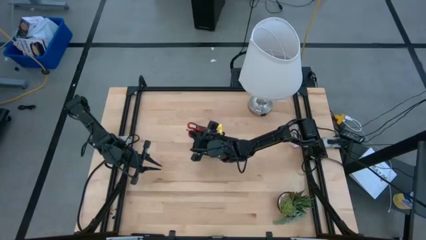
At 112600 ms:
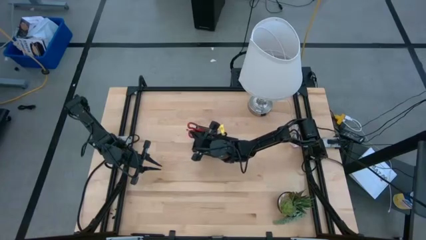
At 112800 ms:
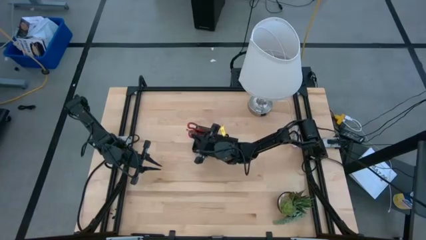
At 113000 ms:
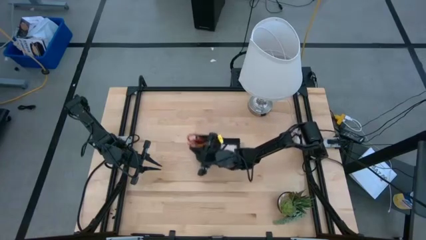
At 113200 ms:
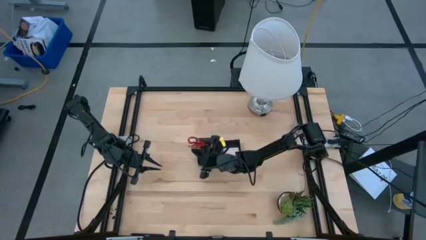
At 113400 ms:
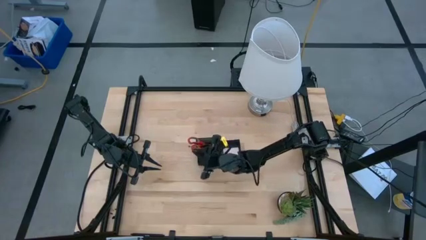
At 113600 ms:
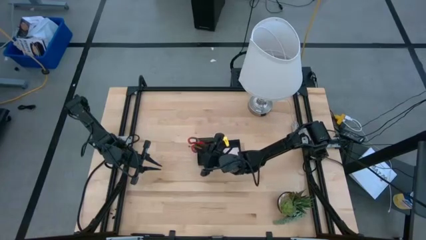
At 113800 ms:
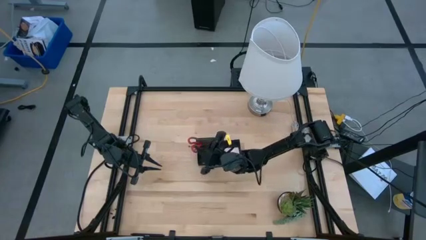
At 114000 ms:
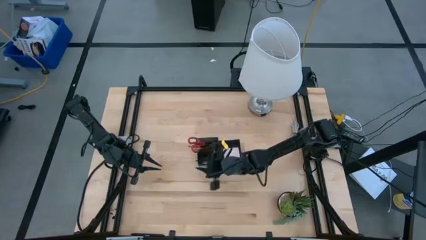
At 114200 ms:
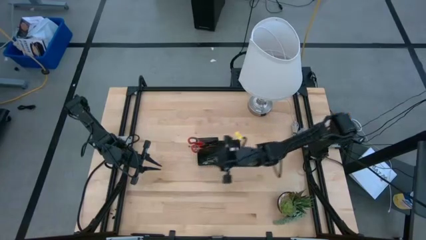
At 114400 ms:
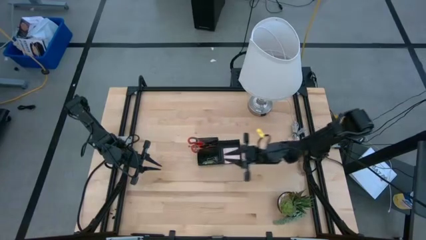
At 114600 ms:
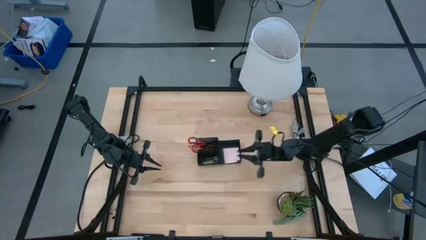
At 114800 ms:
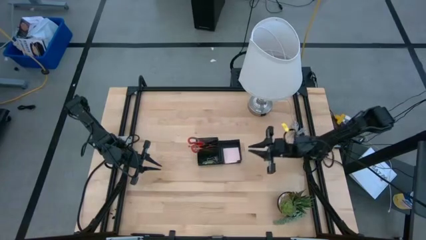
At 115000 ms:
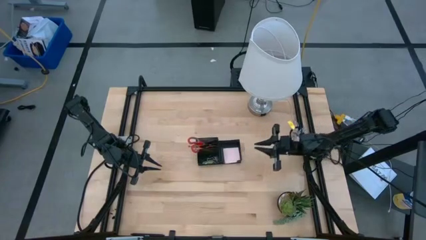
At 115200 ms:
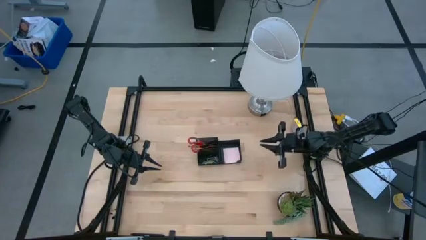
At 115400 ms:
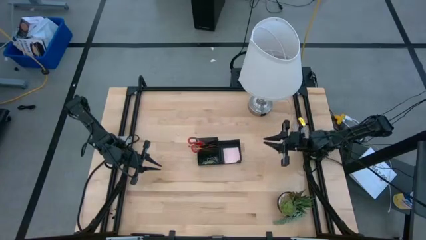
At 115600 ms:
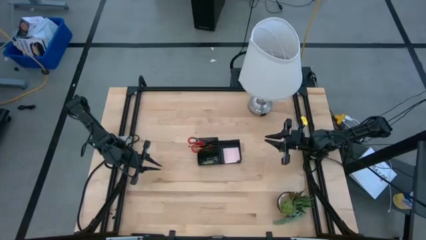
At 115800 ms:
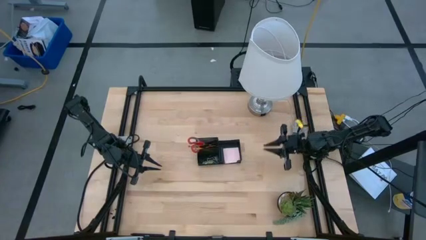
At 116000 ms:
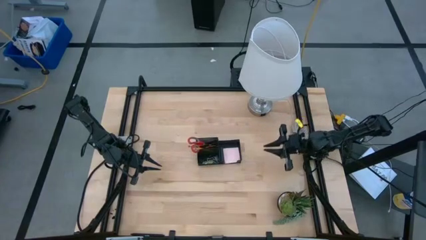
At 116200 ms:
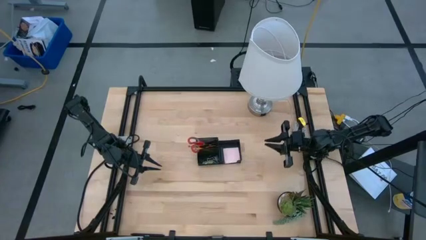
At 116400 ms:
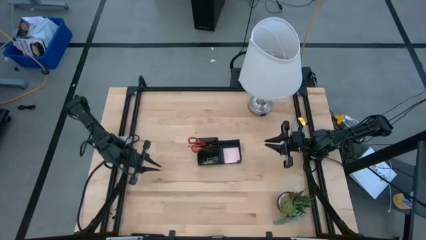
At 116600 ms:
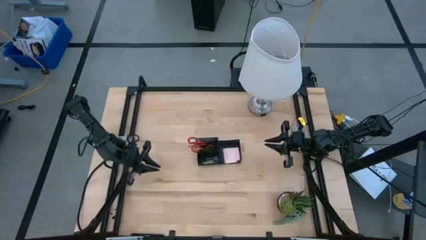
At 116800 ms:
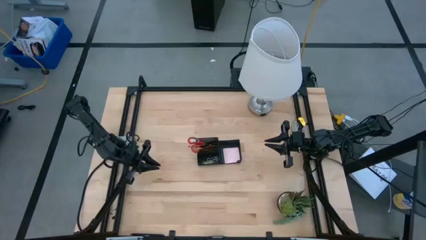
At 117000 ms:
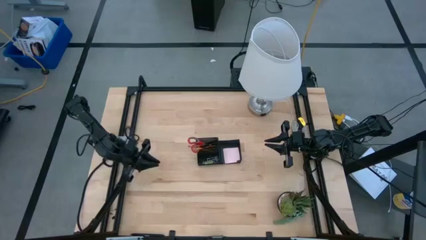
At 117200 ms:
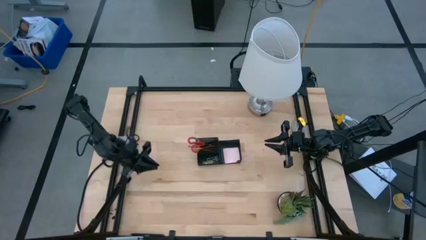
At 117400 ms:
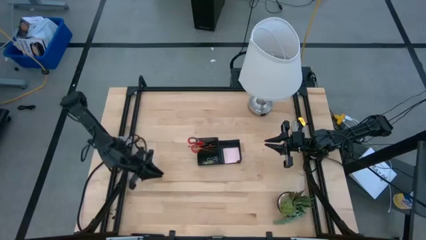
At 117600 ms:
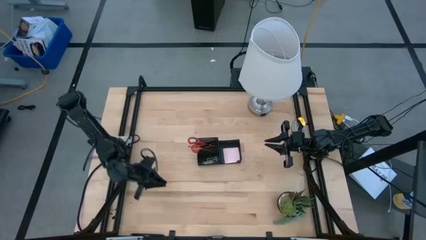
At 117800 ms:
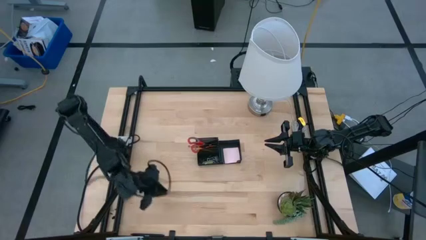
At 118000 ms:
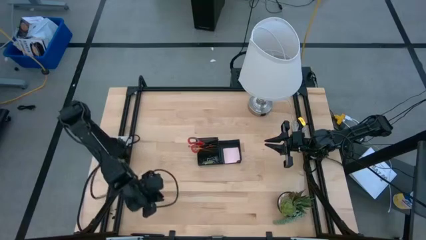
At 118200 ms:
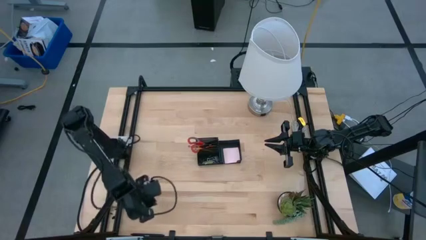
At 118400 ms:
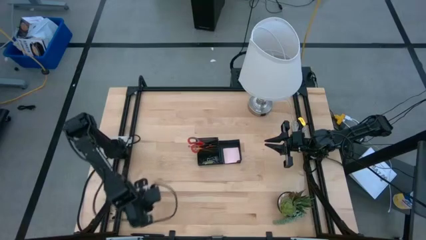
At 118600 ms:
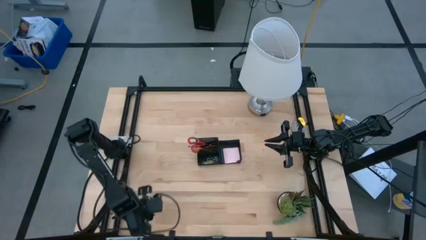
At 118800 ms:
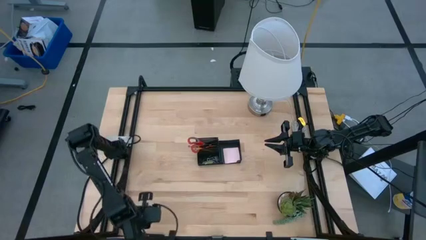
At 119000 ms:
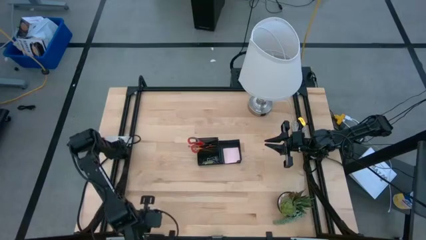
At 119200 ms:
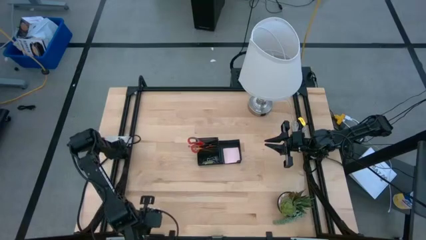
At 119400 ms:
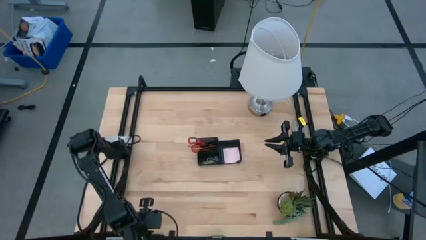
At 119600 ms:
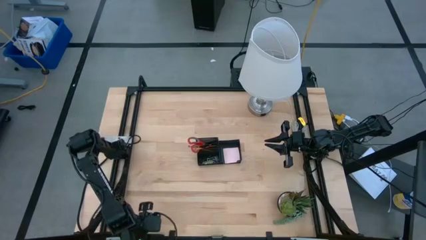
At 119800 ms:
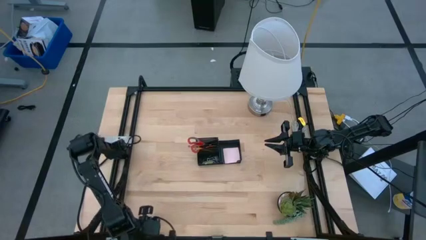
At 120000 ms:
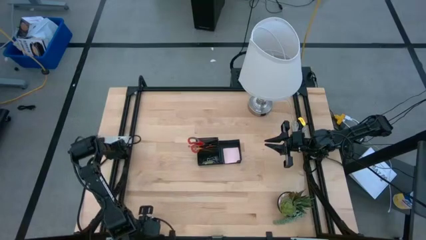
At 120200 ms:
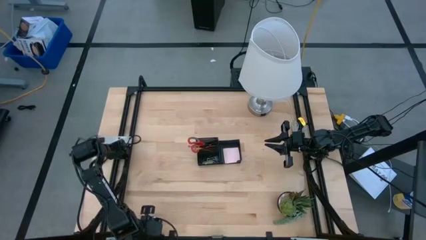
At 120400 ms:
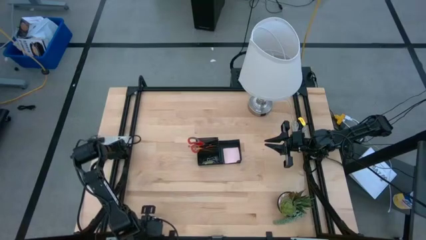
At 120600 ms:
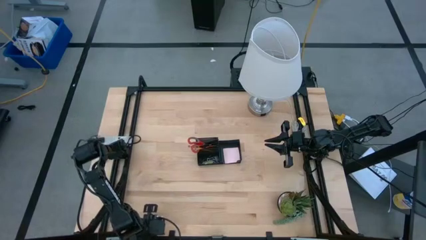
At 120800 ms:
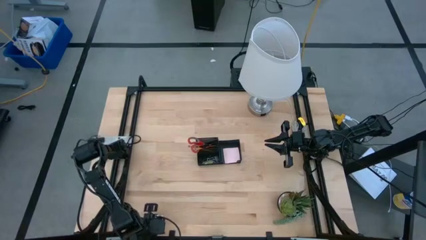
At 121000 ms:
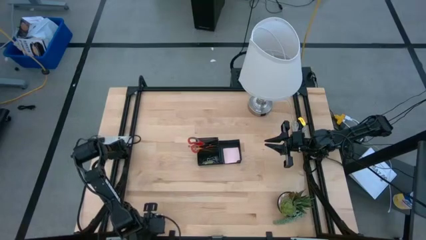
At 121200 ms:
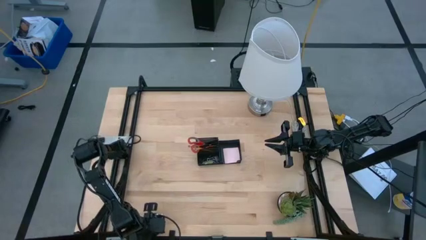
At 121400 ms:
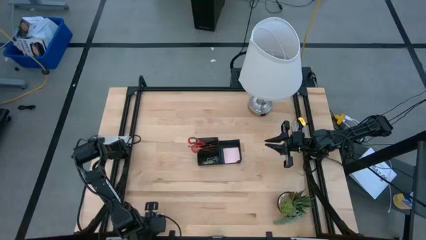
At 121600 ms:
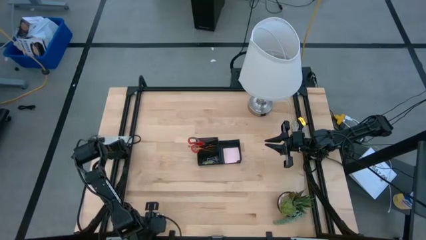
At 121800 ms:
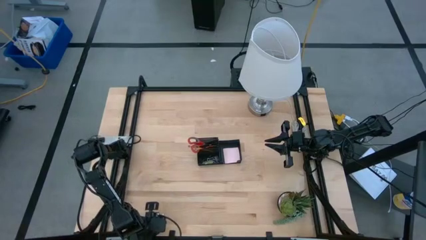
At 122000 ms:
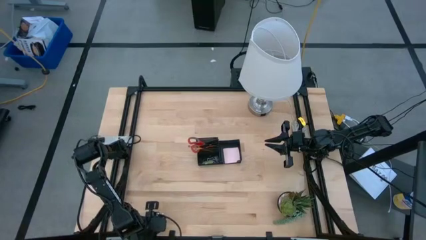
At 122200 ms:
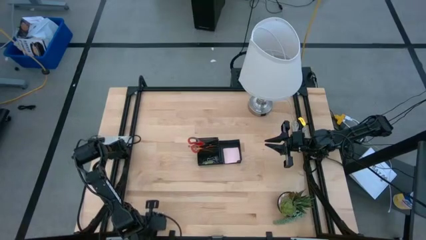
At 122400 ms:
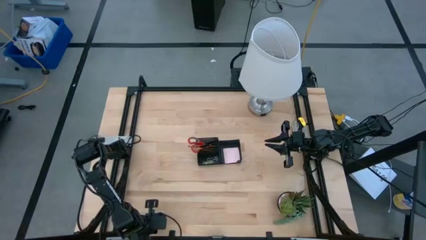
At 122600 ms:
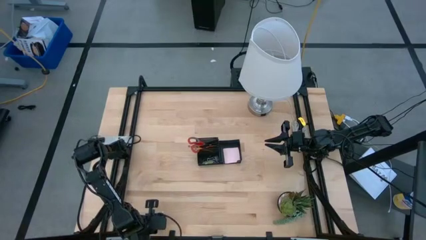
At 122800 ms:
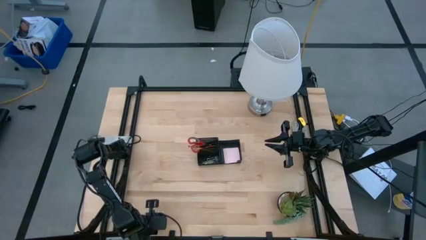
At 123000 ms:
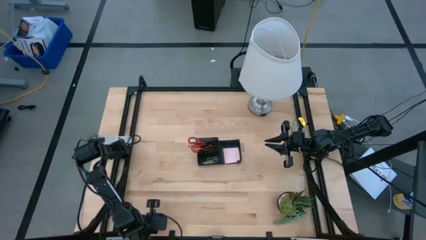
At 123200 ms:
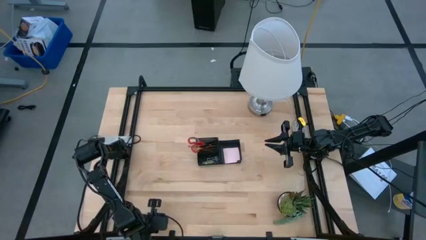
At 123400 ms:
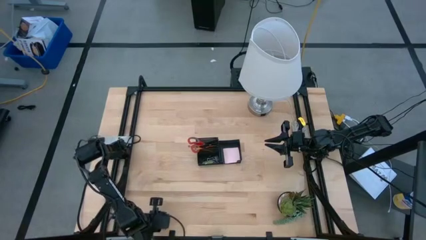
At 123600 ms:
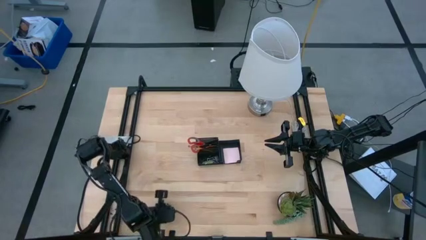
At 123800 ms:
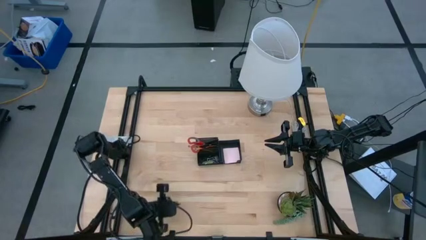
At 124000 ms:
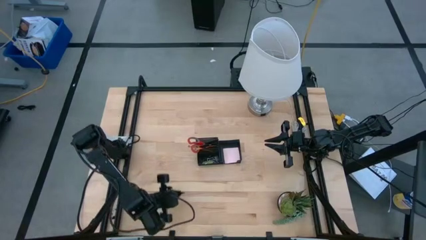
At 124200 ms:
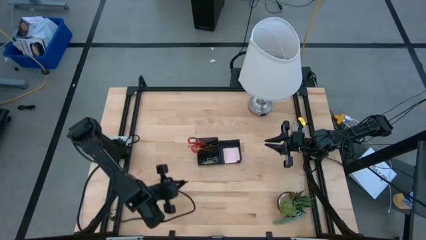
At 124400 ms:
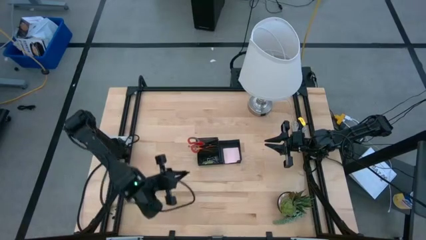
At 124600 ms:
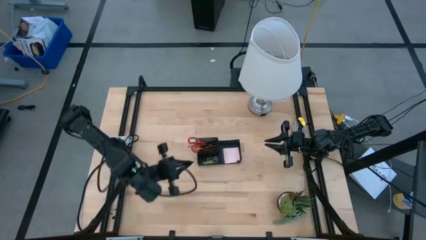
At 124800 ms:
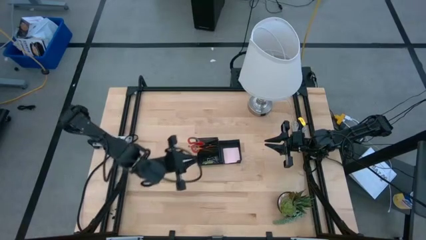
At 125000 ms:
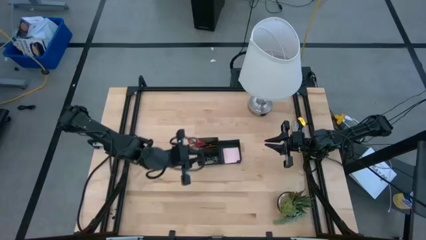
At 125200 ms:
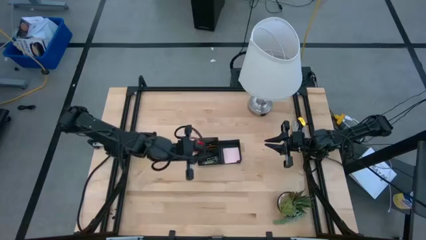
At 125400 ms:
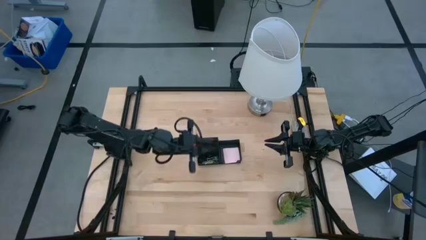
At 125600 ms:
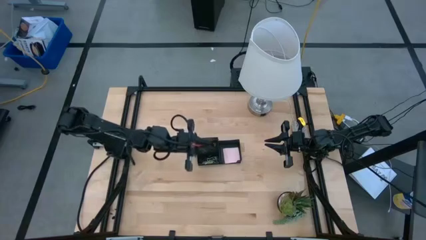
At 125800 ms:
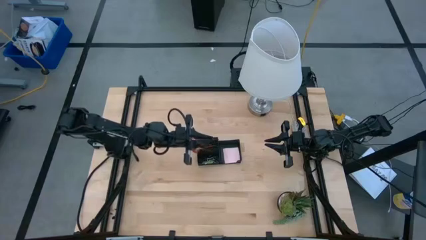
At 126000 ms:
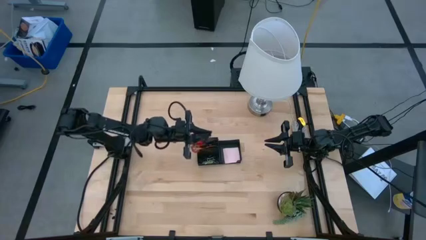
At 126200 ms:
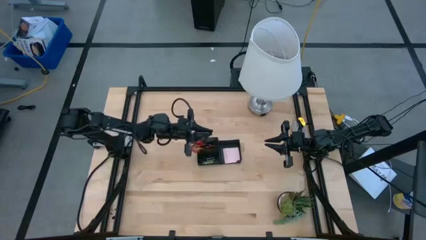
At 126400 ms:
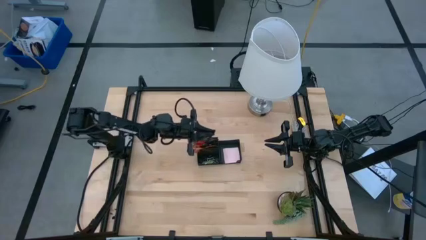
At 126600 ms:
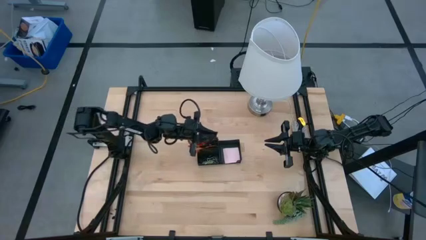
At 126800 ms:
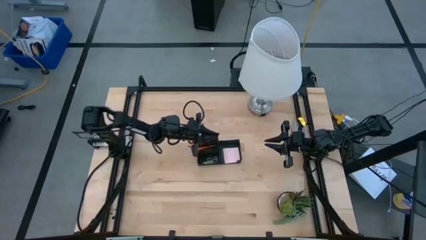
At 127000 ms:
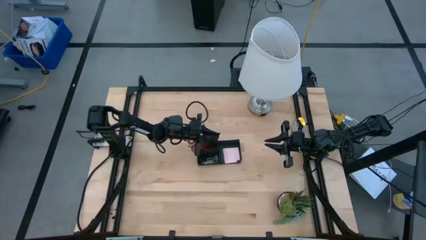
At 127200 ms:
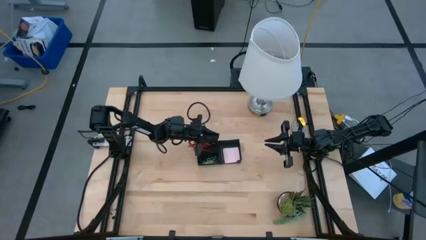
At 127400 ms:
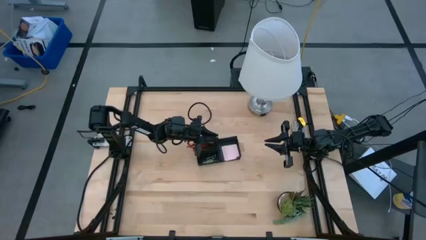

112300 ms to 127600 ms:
Task: Pick and place office supplies into organizer
Put the black pen into the black desk organizer
